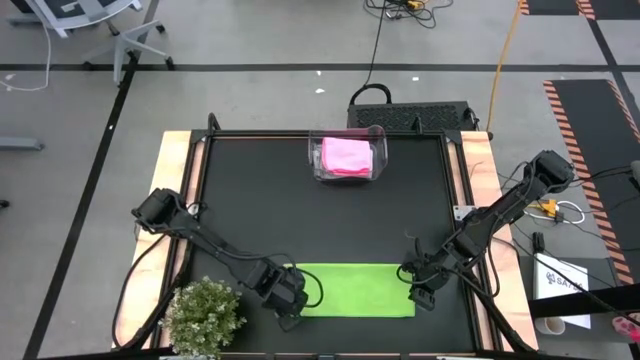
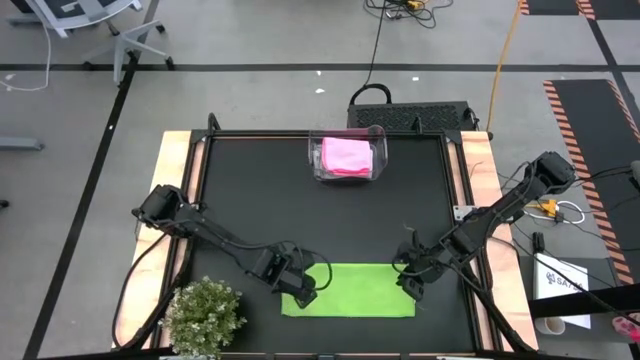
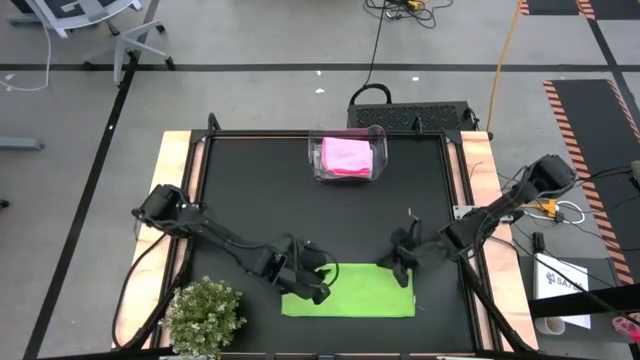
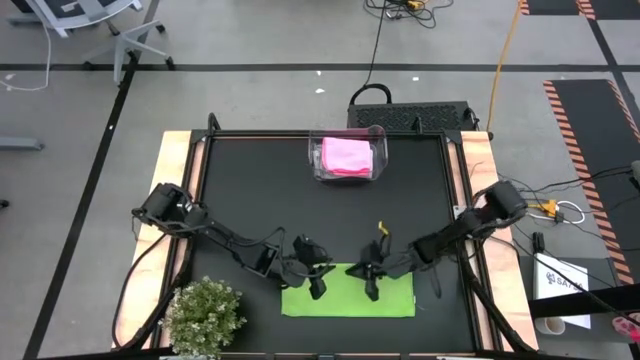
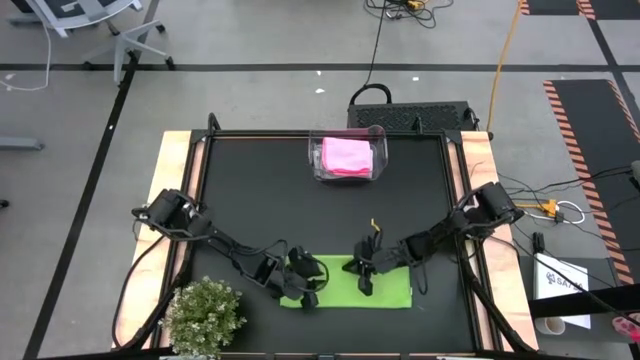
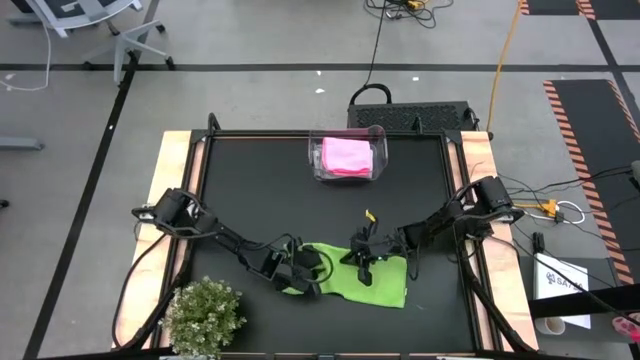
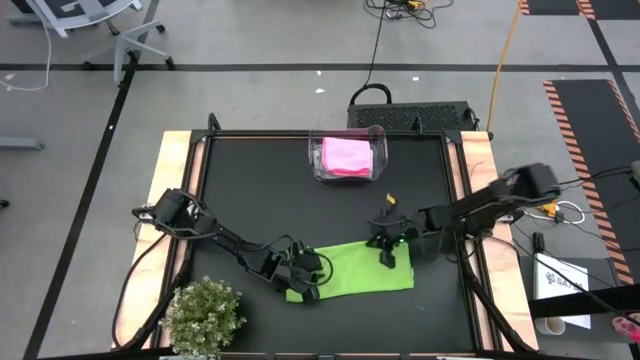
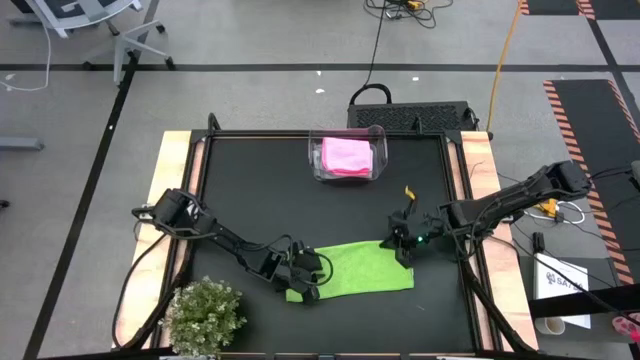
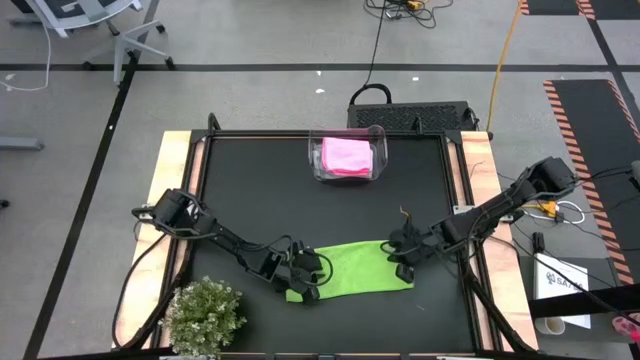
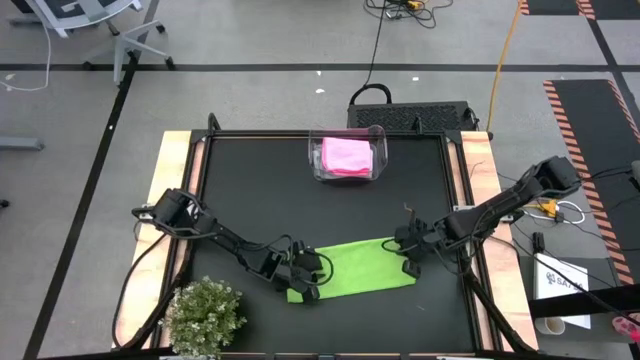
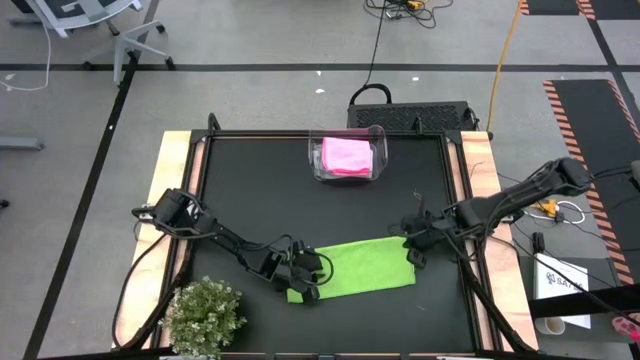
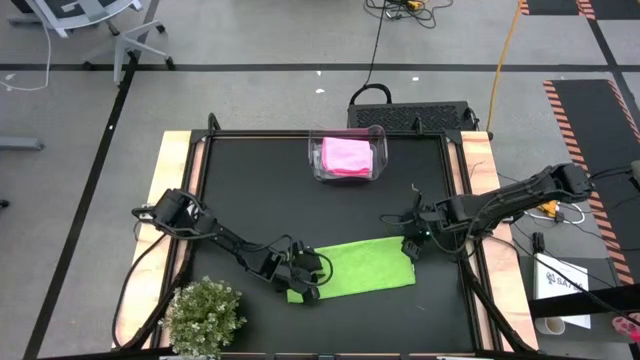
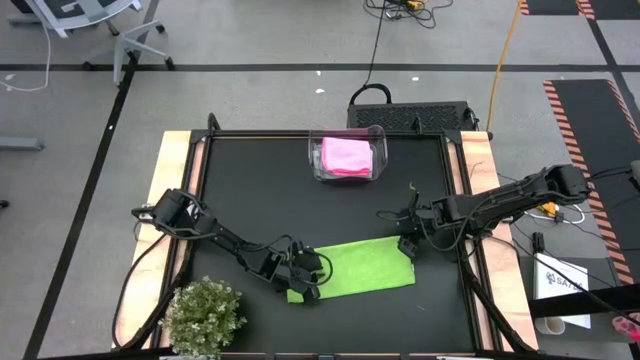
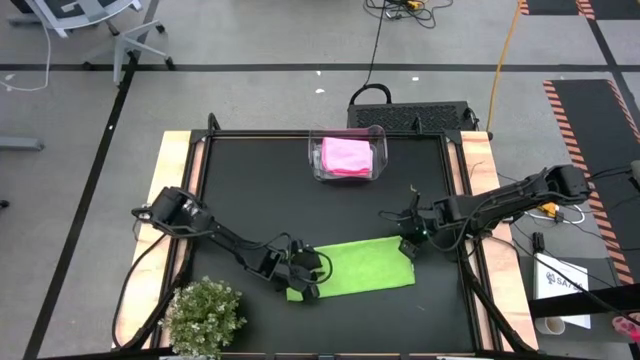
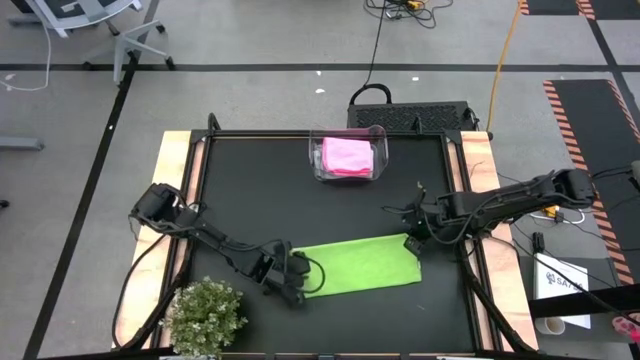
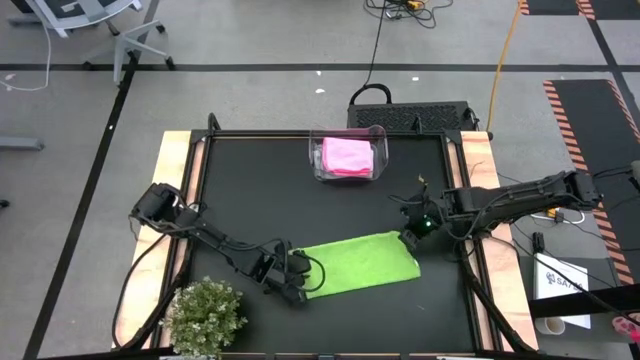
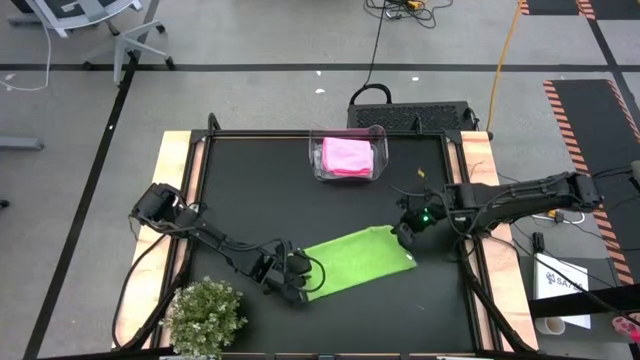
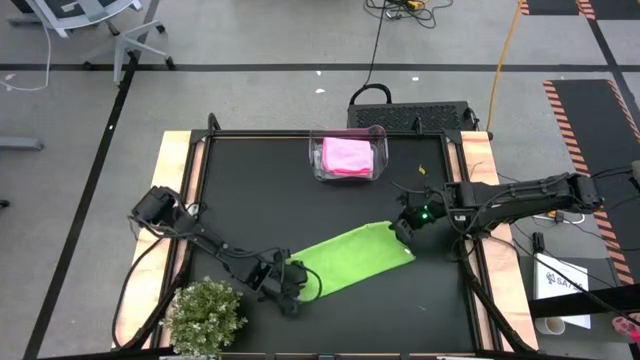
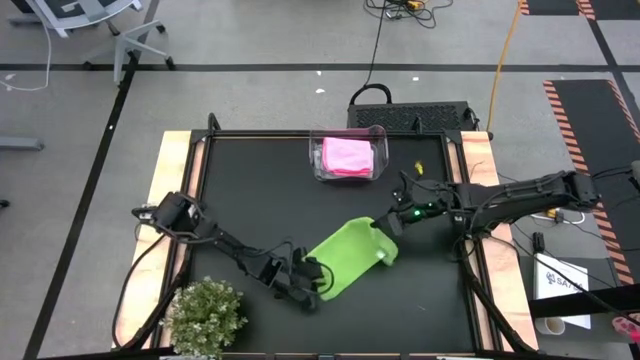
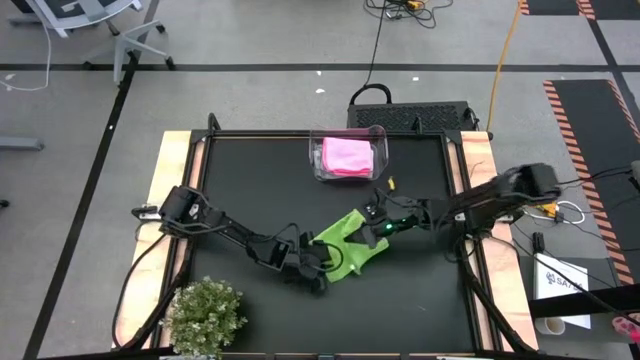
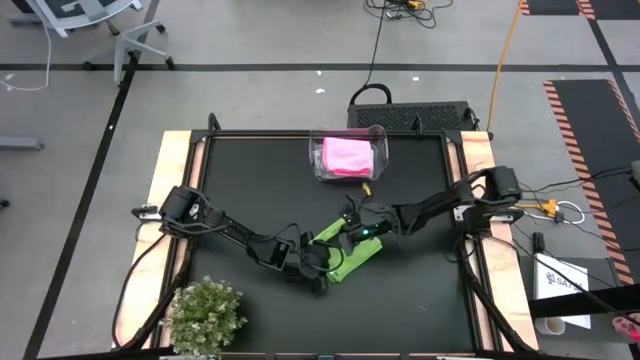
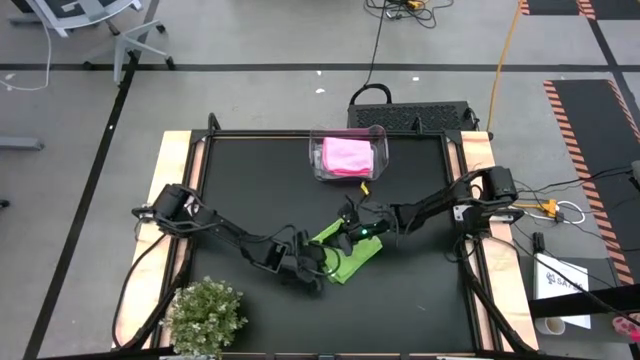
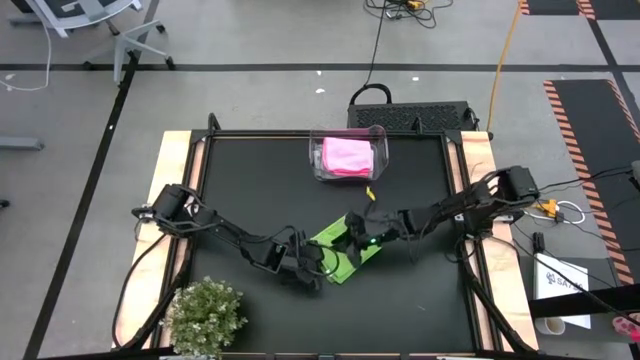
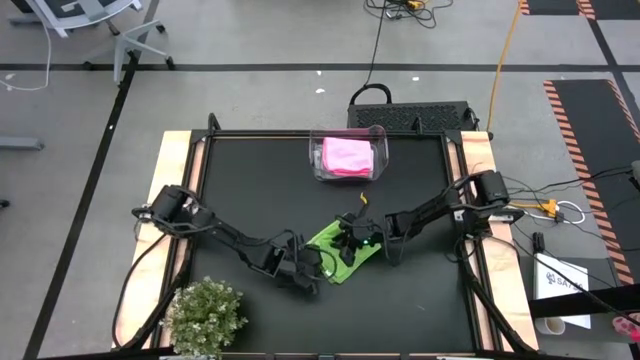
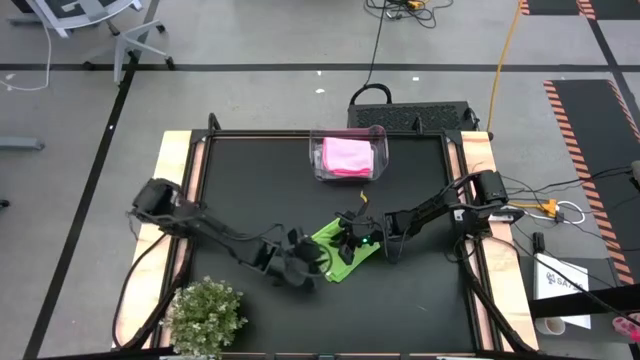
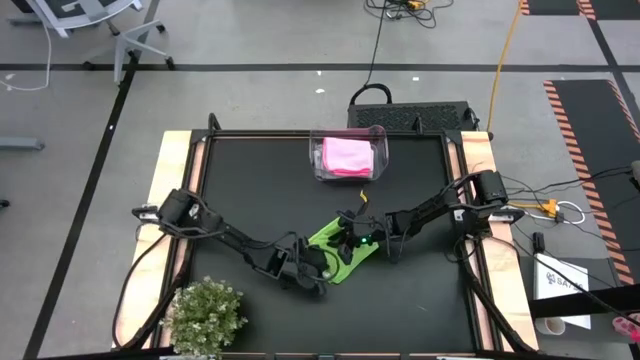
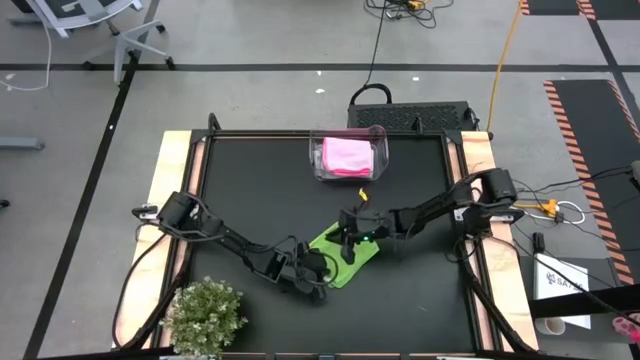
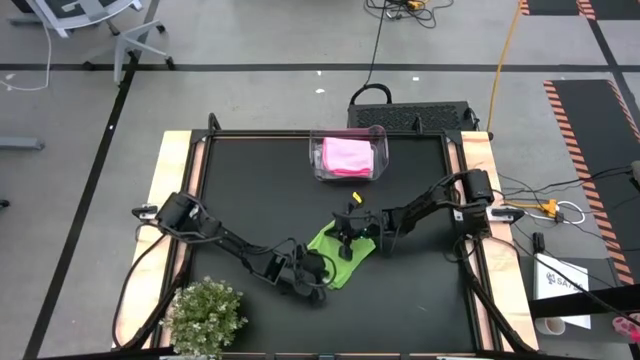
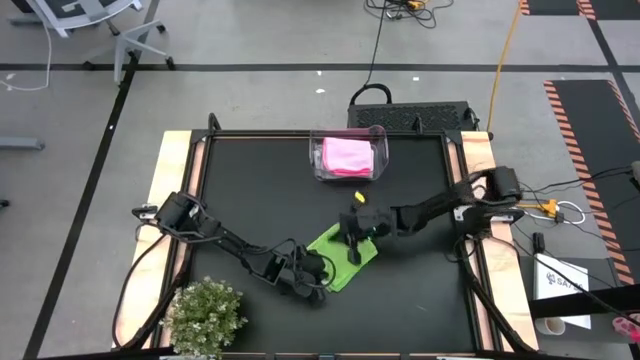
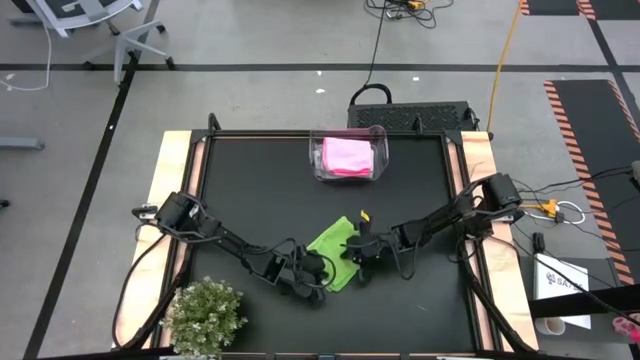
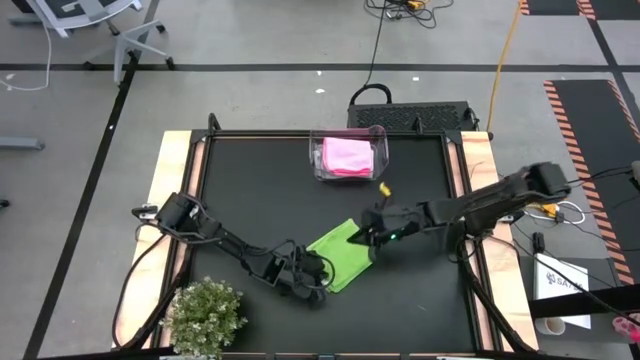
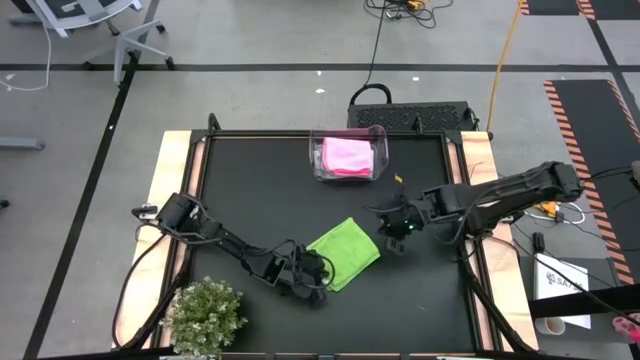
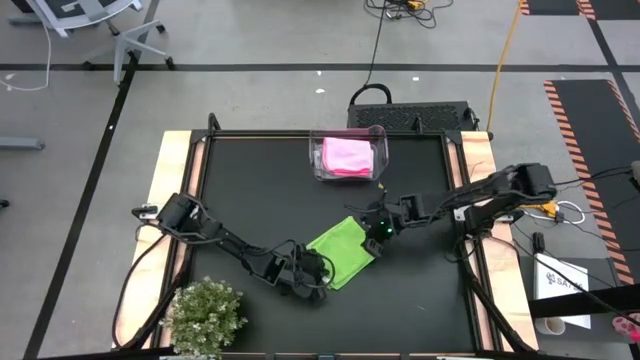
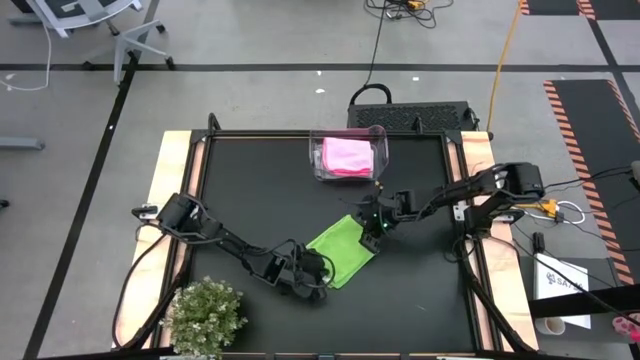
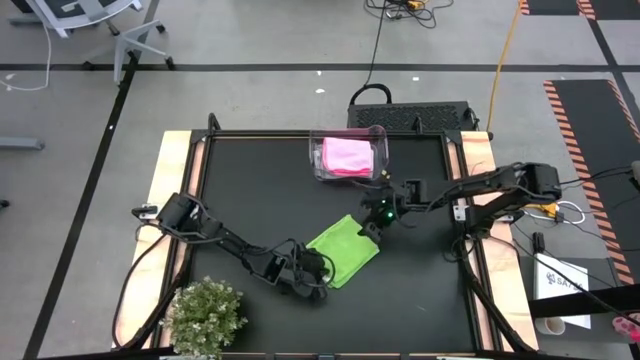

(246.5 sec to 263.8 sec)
Task: Fold microfiber towels
Fold the green microfiber cloth

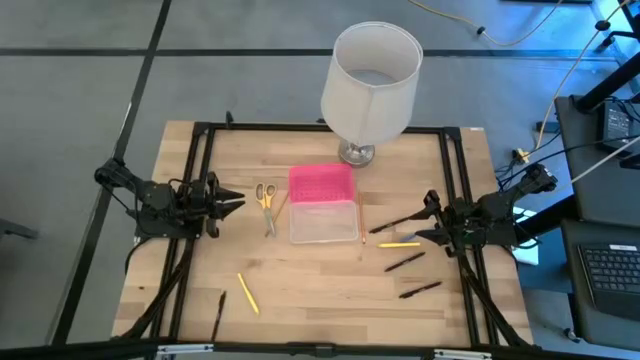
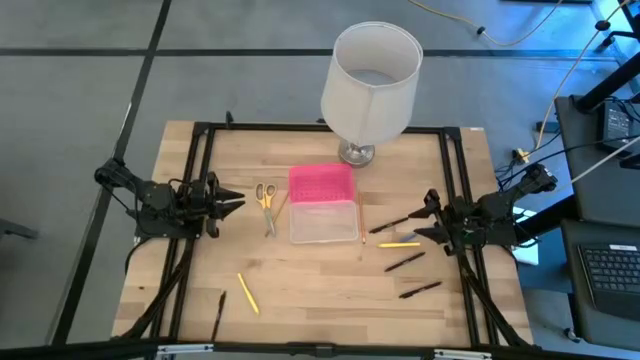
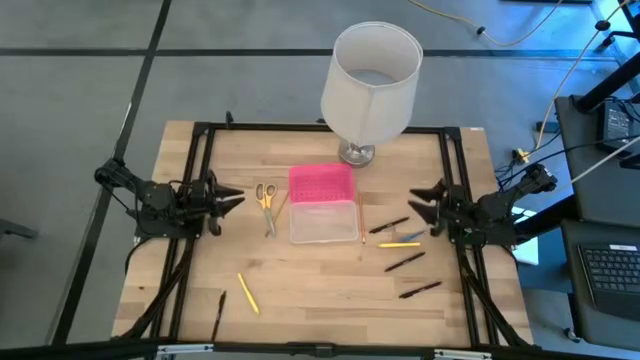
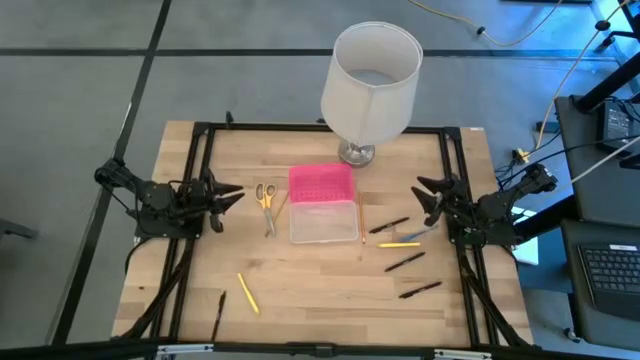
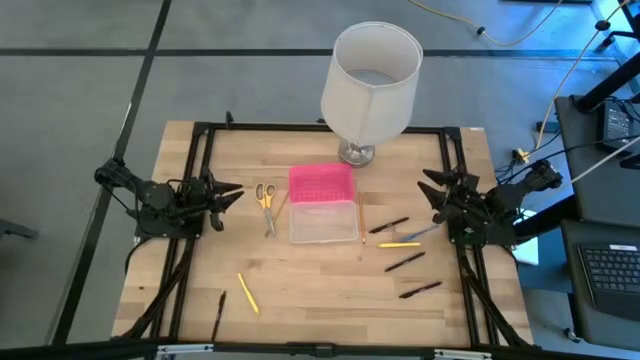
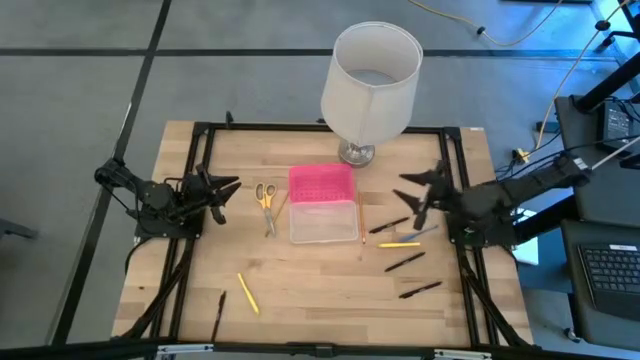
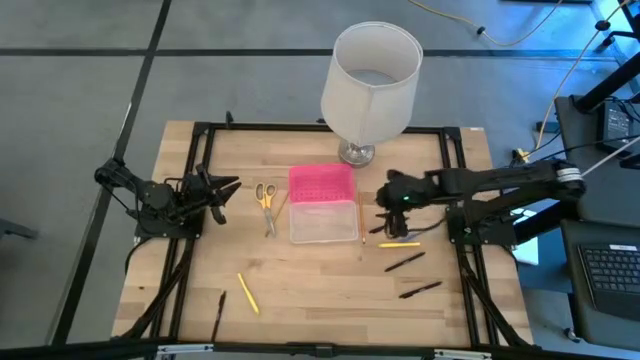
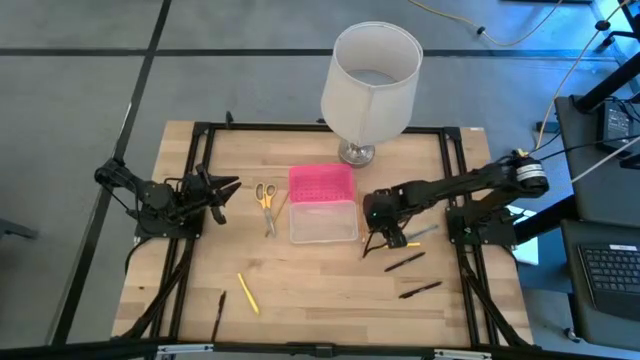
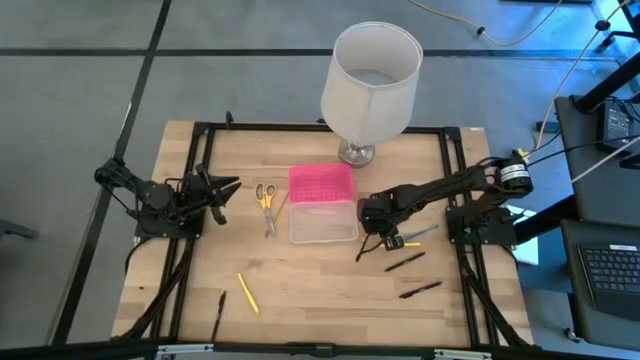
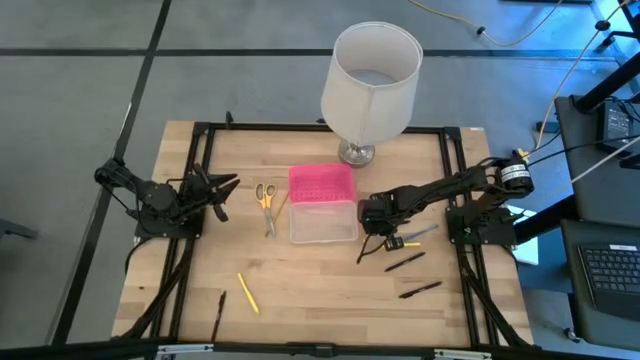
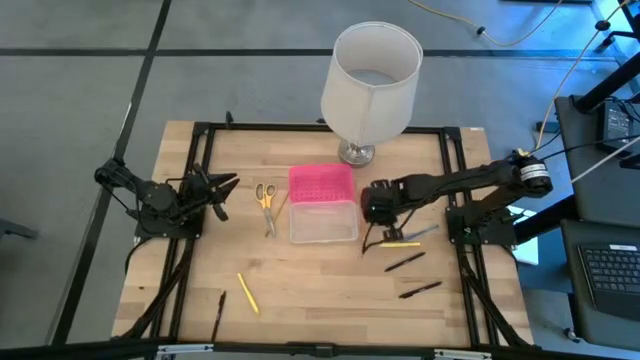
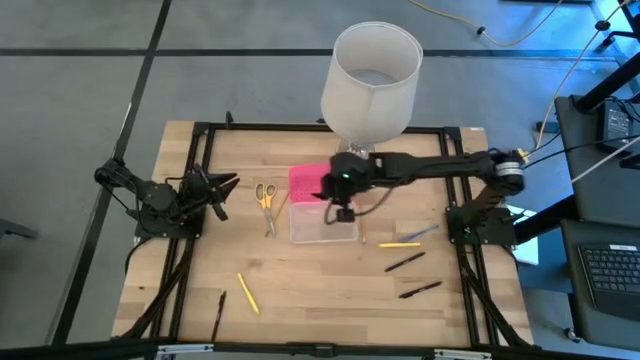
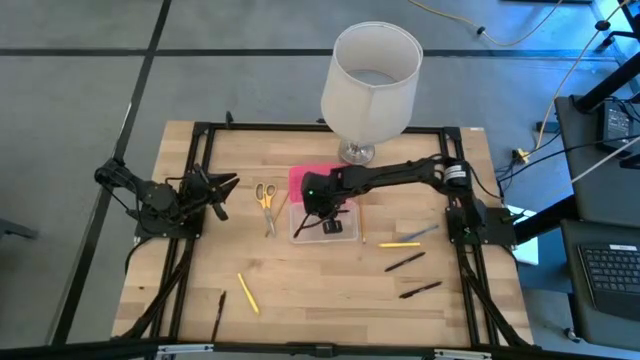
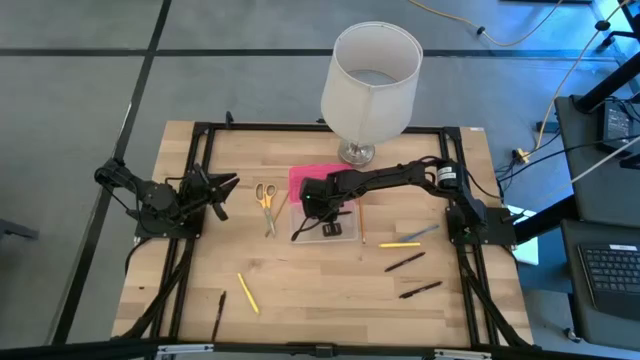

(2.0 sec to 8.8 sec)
Task: Pick & place school supplies into a supply box
Put the black pen into the supply box
